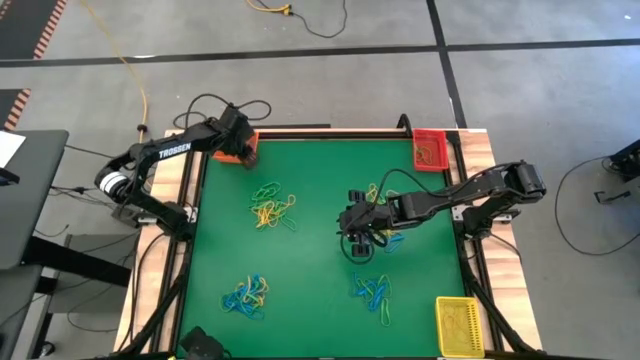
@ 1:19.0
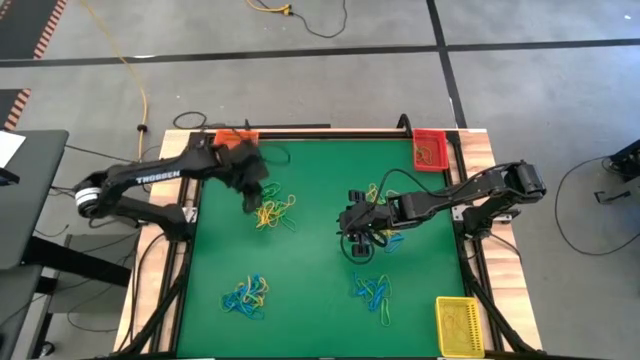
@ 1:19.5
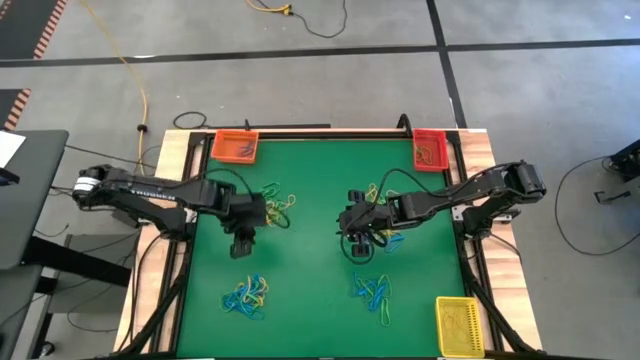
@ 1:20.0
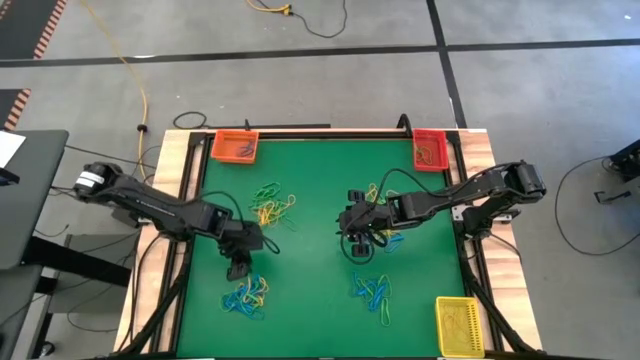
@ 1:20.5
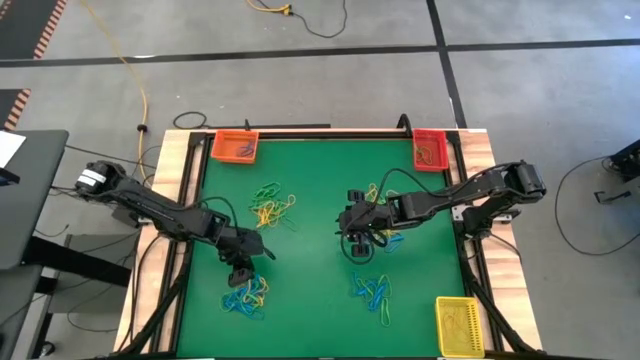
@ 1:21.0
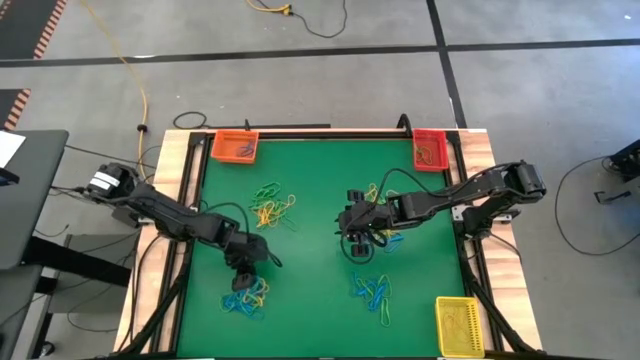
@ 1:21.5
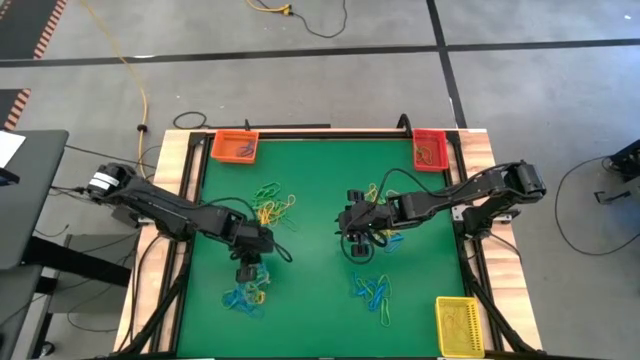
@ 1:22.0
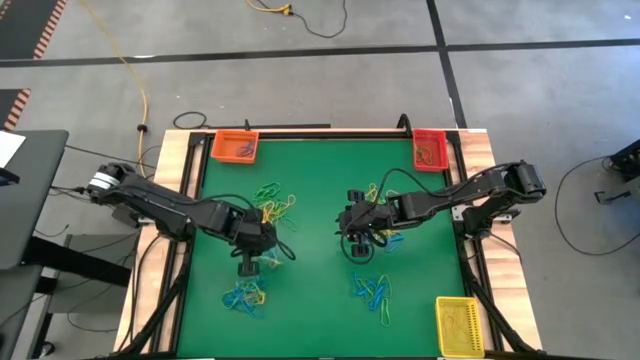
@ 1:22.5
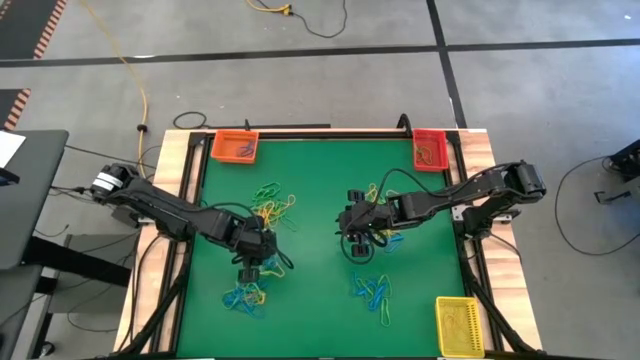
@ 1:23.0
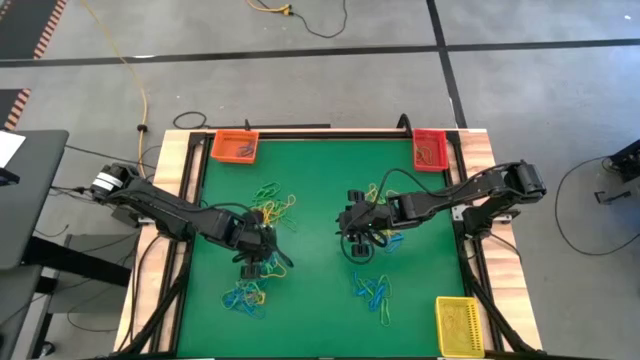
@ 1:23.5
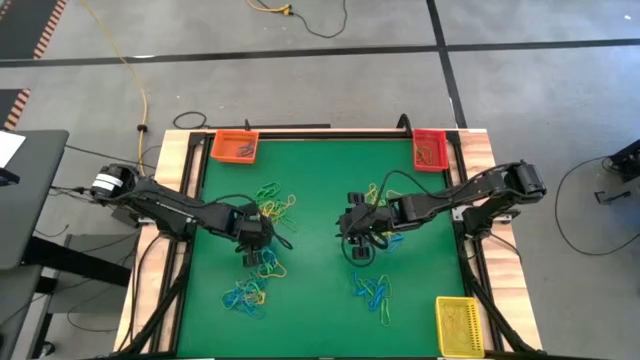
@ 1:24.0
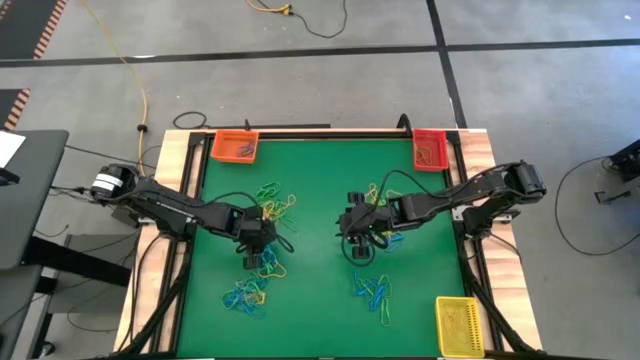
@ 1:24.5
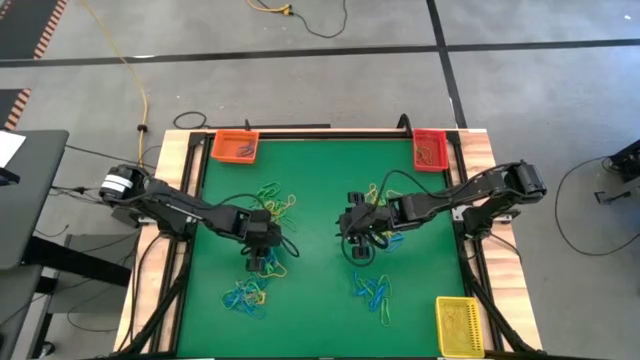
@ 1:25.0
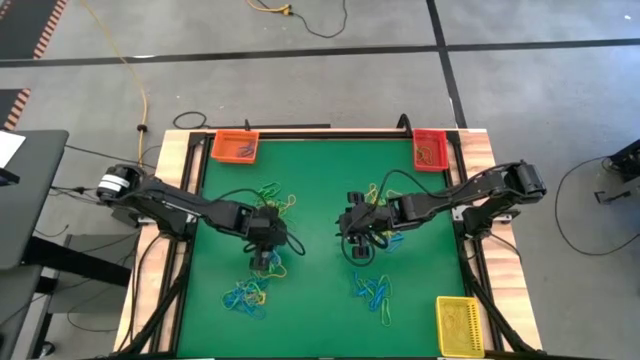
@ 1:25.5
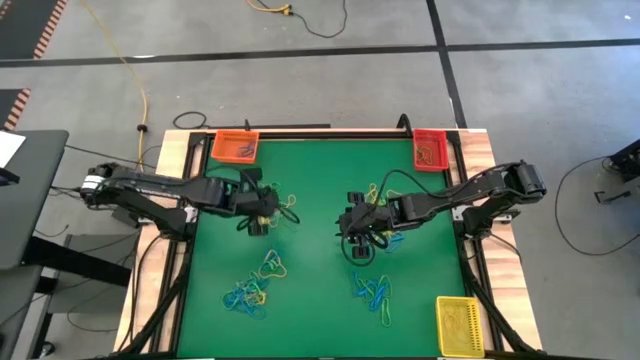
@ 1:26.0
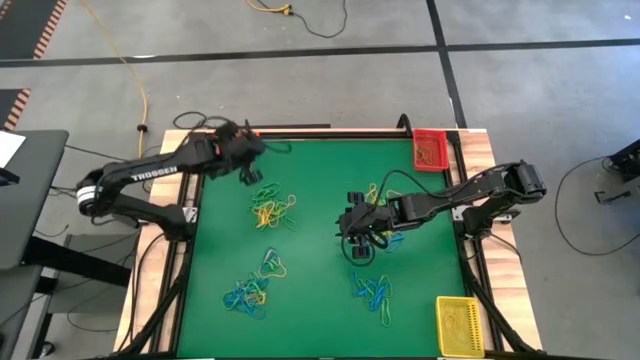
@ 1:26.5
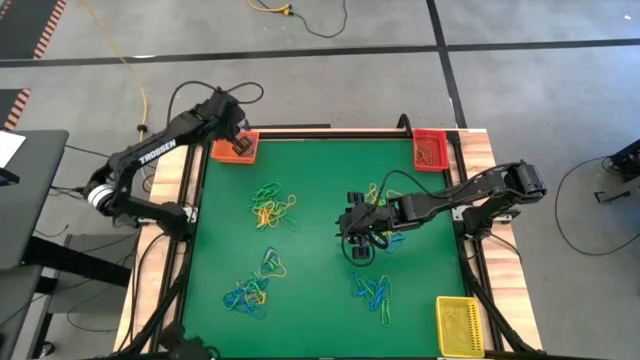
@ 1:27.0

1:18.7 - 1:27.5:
Task: Sort rubber bands into baskets
Put the bottom left blue rubber band into the orange bin

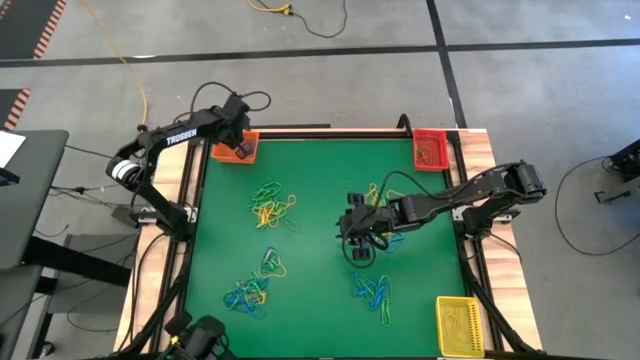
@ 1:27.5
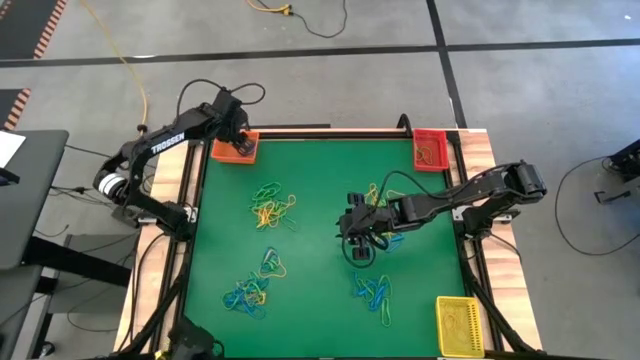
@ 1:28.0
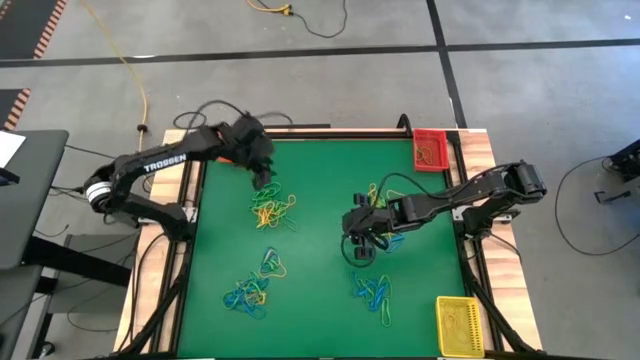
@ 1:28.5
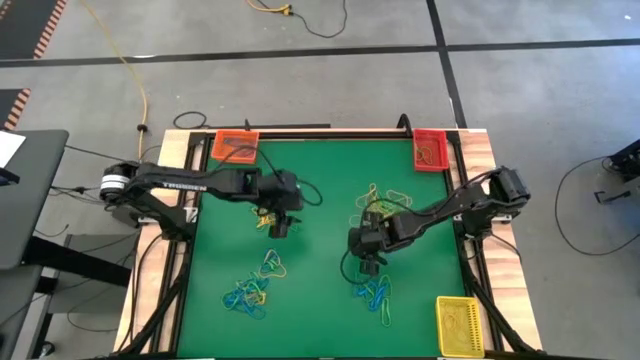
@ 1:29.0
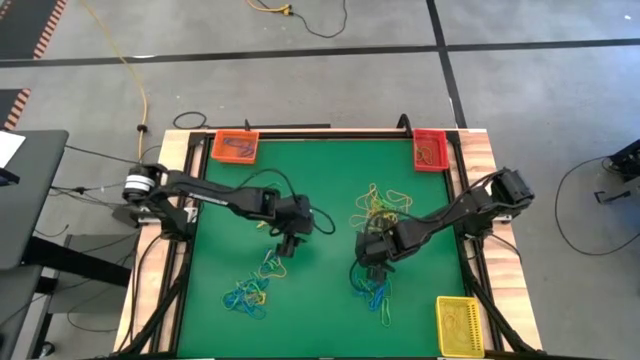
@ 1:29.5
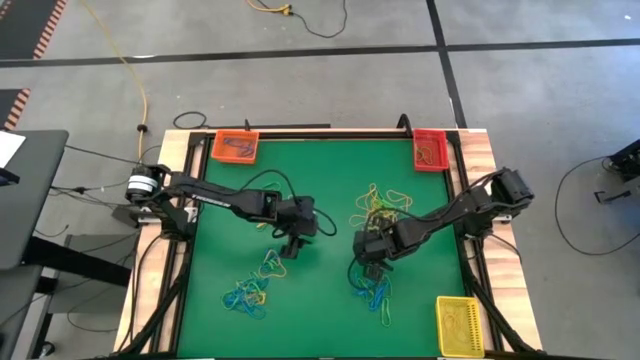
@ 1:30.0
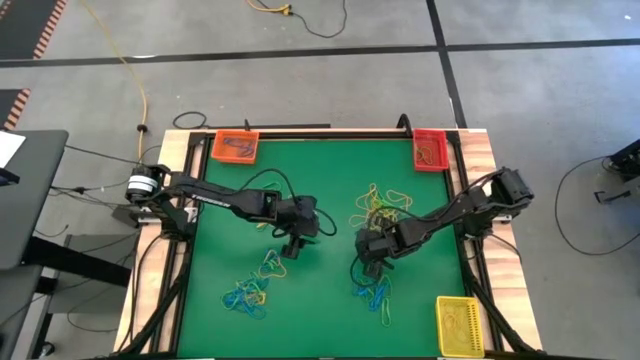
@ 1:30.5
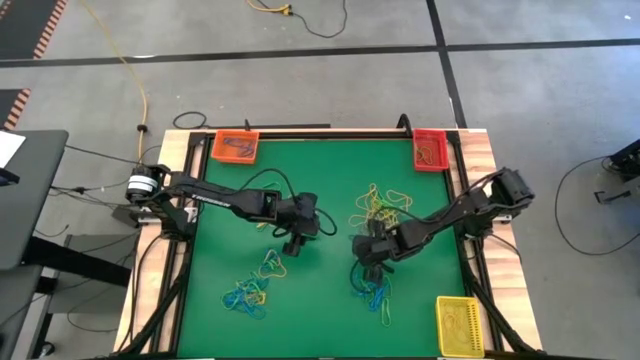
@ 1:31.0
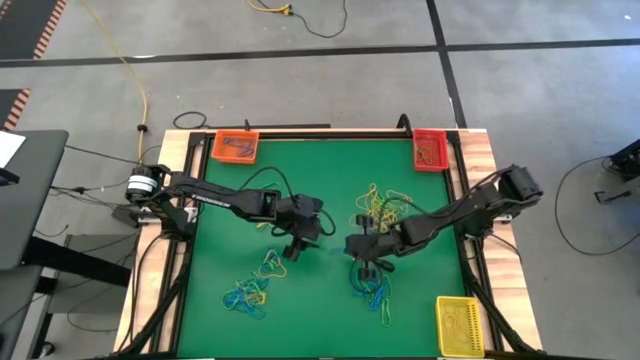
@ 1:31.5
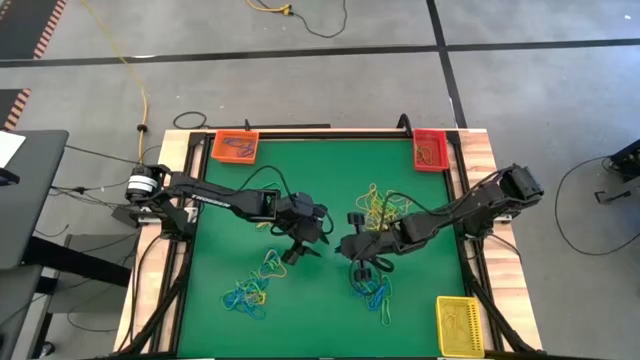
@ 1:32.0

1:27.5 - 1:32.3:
Put the top right blue rubber band into the orange bin

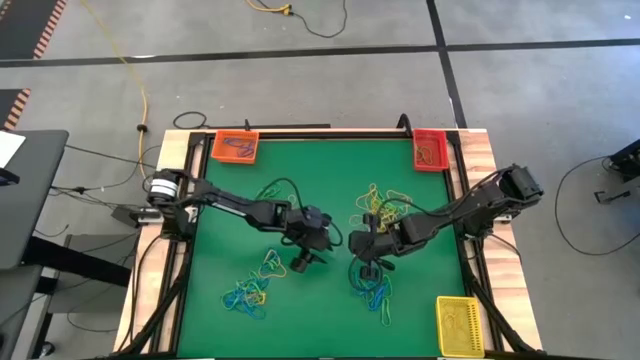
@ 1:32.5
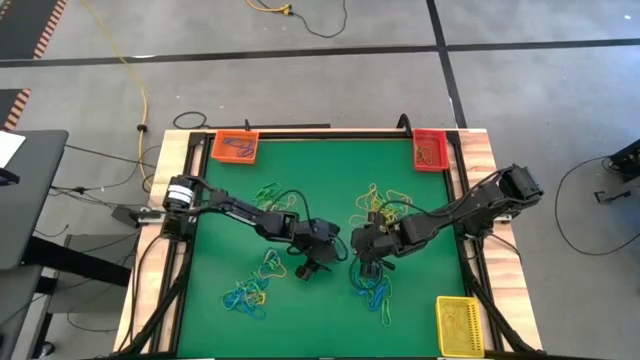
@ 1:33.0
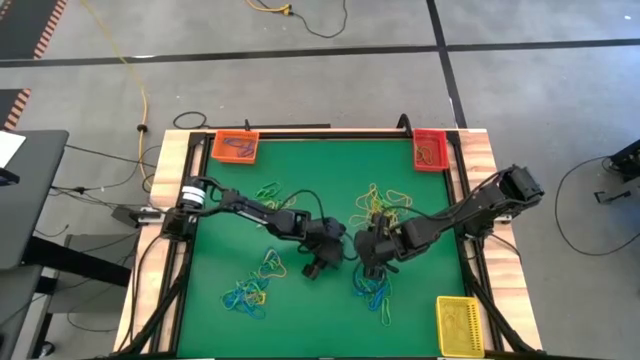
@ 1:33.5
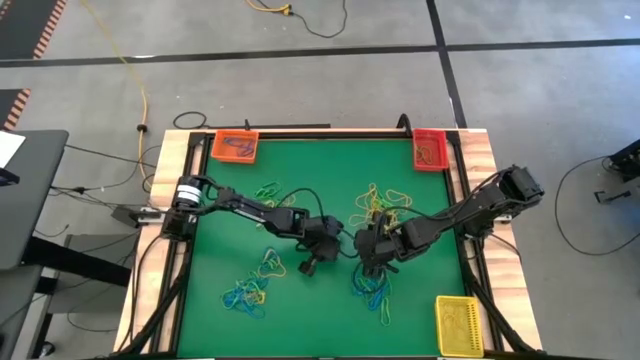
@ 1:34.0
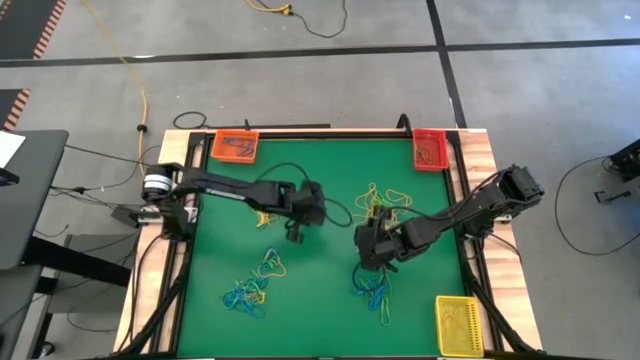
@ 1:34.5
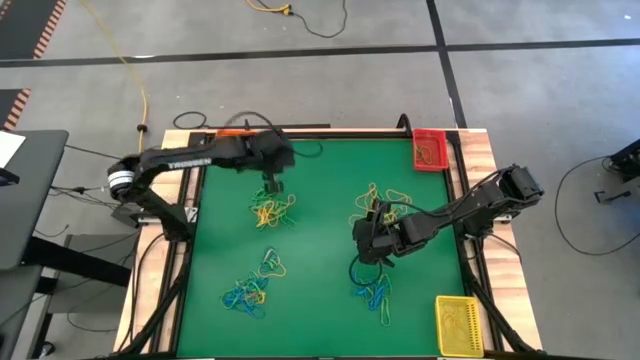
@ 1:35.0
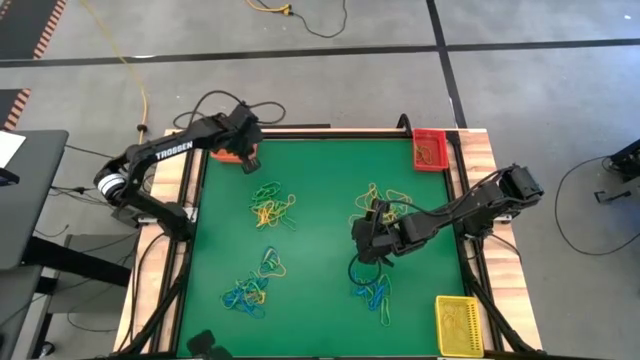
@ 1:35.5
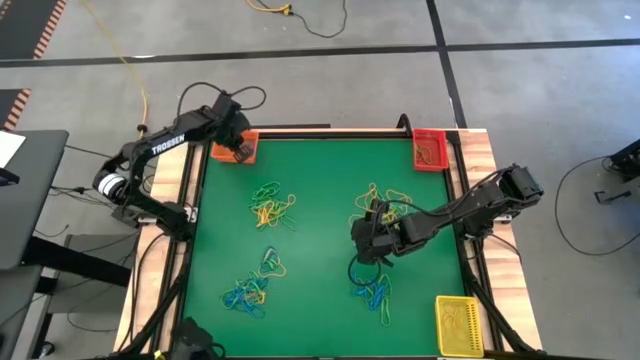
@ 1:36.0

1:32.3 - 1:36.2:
Put the top right blue rubber band into the orange bin
